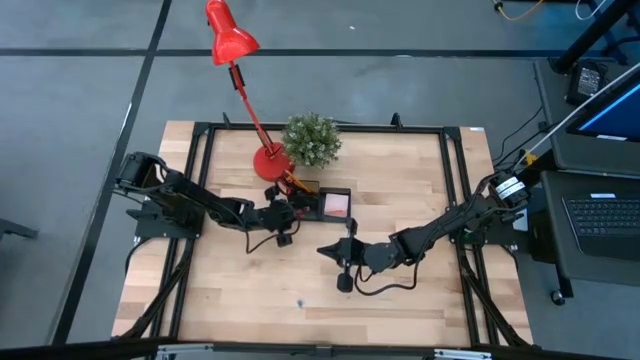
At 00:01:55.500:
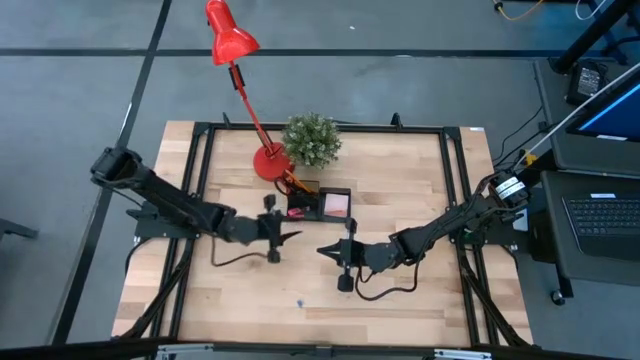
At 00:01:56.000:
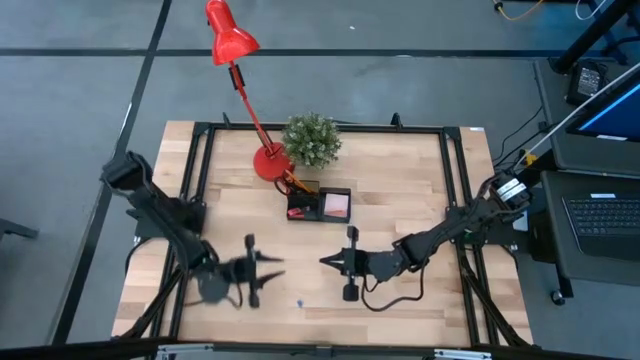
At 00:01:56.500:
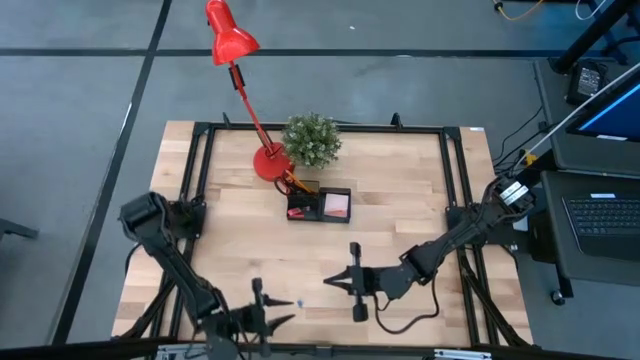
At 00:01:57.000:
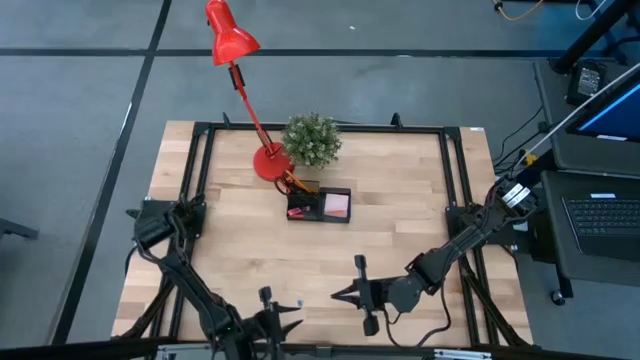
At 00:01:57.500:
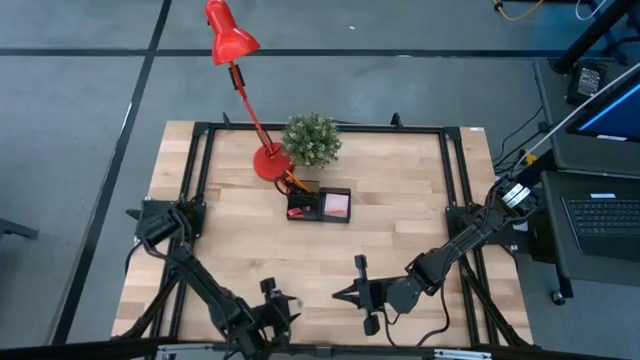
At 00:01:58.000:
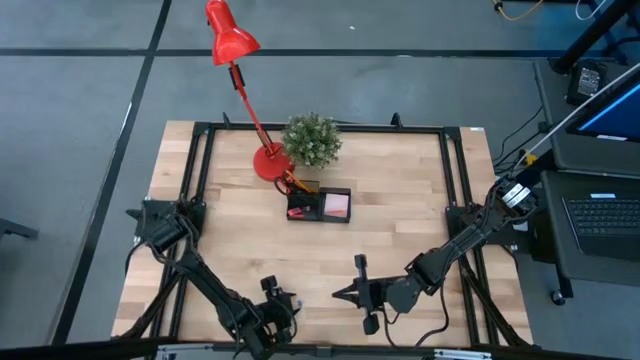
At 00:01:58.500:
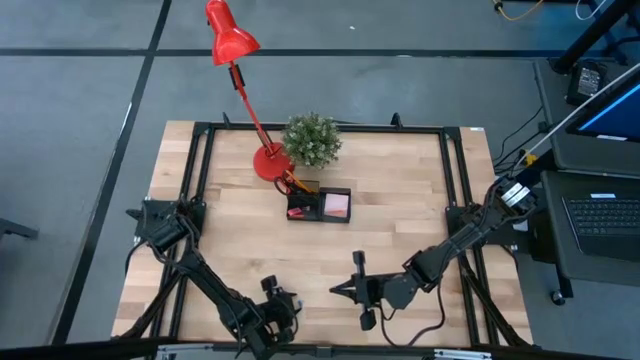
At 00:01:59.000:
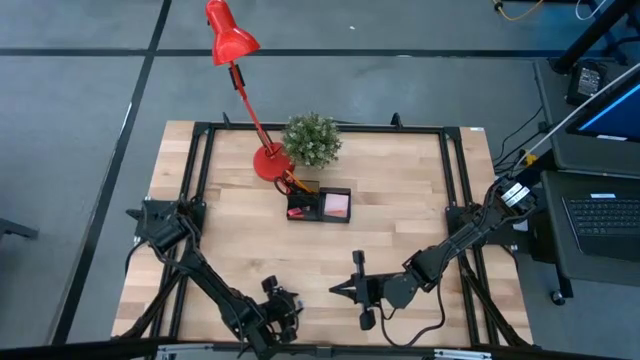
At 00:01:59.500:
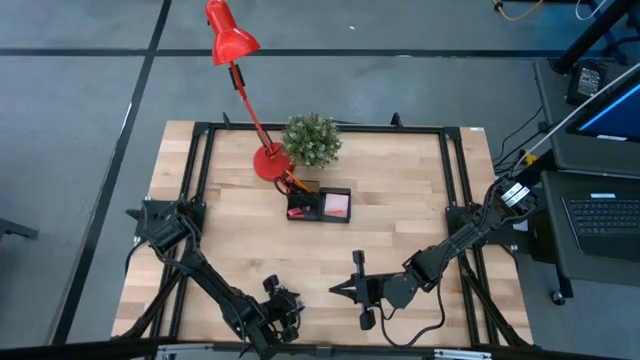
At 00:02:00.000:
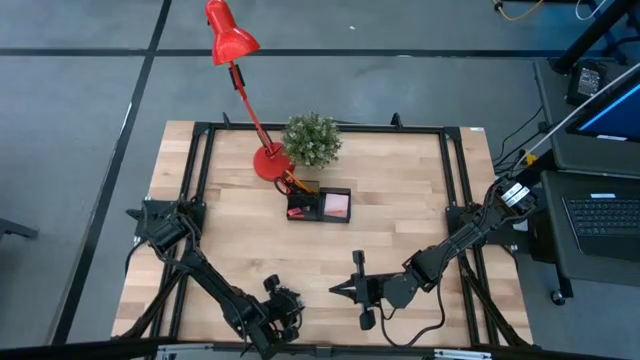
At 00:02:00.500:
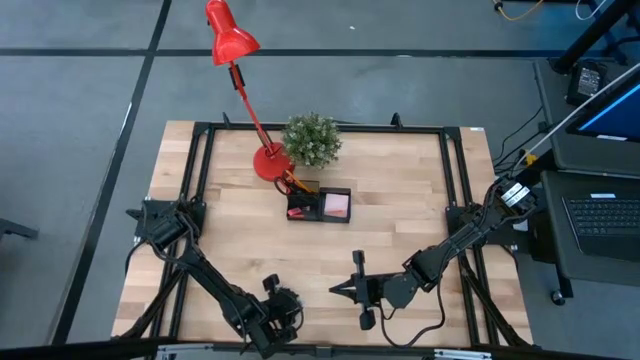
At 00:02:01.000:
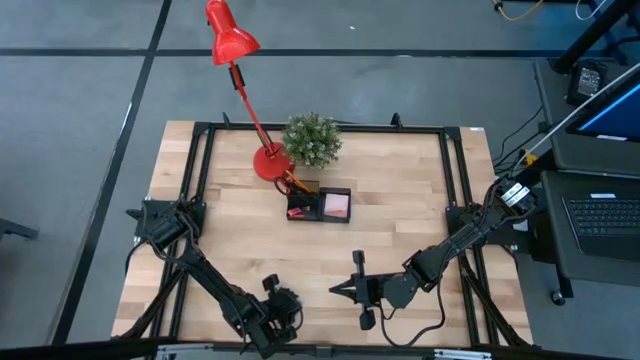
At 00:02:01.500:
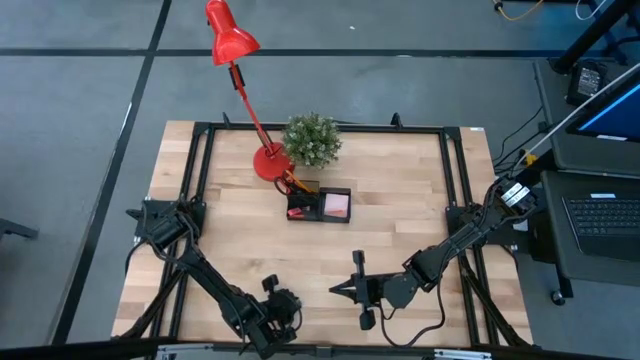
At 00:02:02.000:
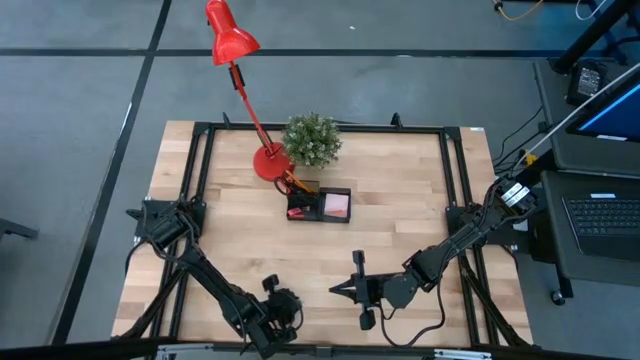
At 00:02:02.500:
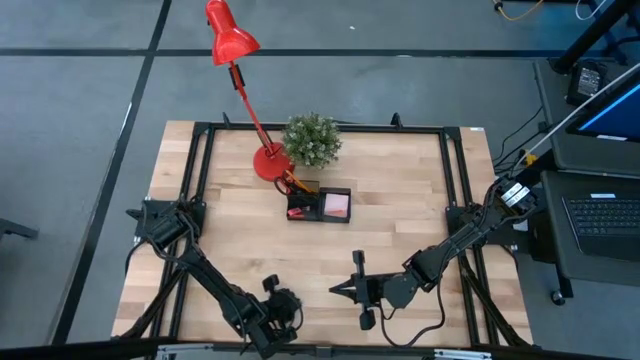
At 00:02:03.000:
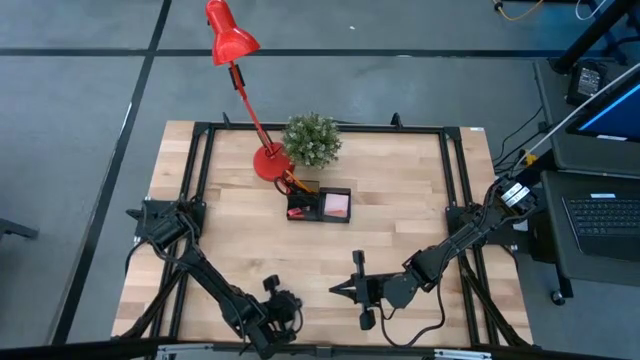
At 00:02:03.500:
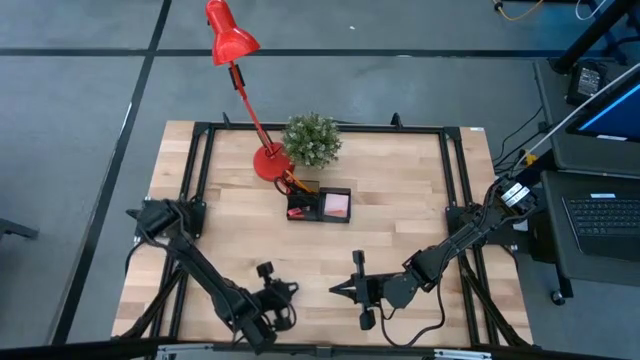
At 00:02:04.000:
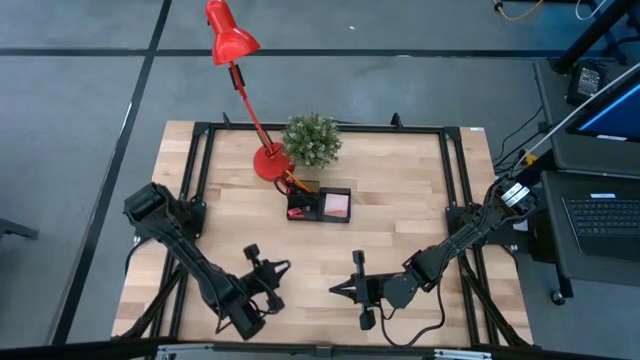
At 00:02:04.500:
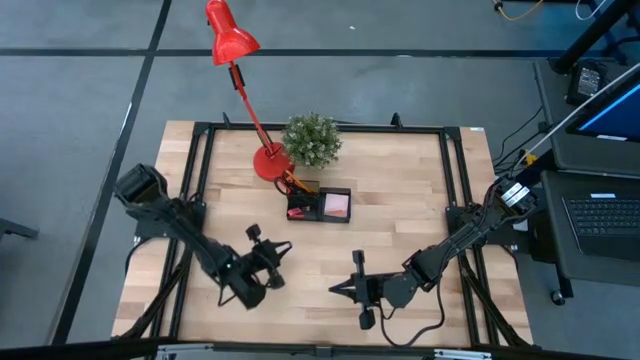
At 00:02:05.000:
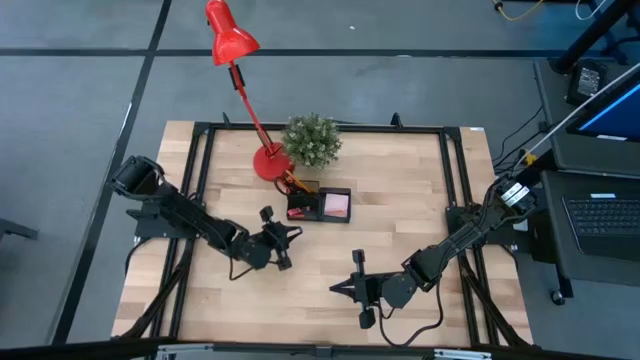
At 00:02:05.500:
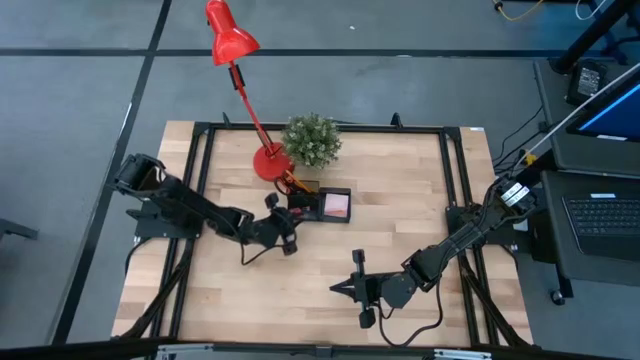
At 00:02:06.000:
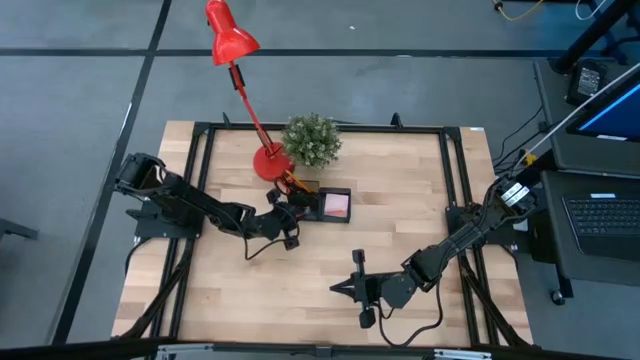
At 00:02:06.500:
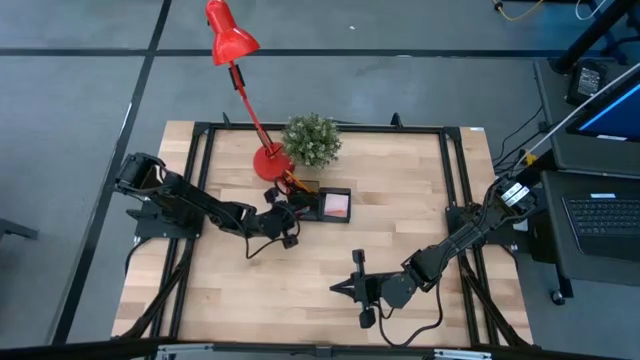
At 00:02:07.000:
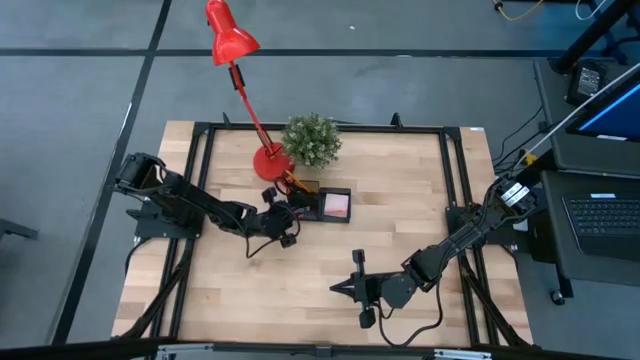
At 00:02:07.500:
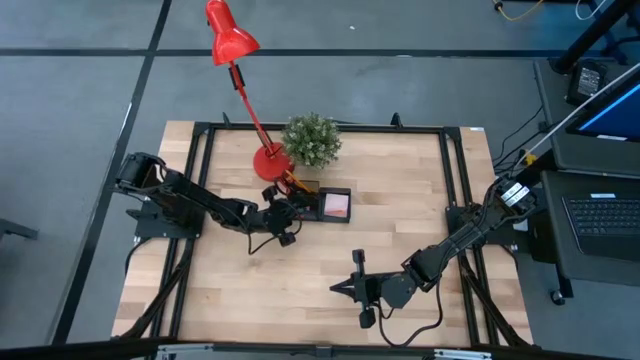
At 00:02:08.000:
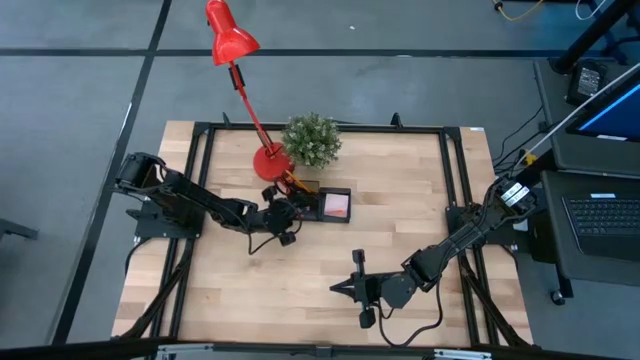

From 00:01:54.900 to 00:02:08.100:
Task: Pick and place office supplies into organizer
Put the blue binder clip into the black desk organizer

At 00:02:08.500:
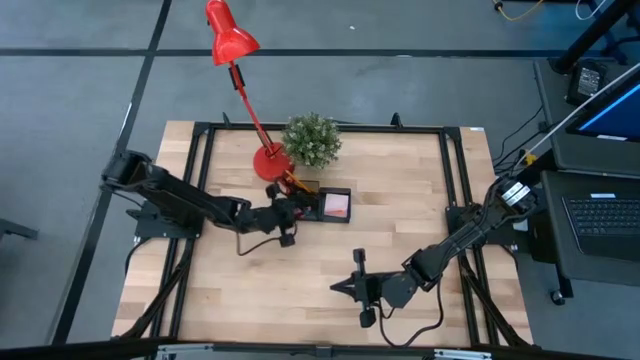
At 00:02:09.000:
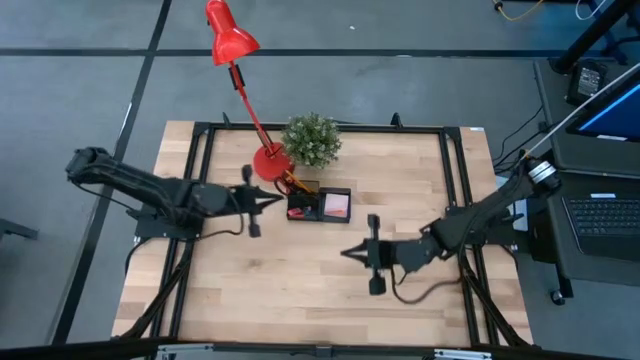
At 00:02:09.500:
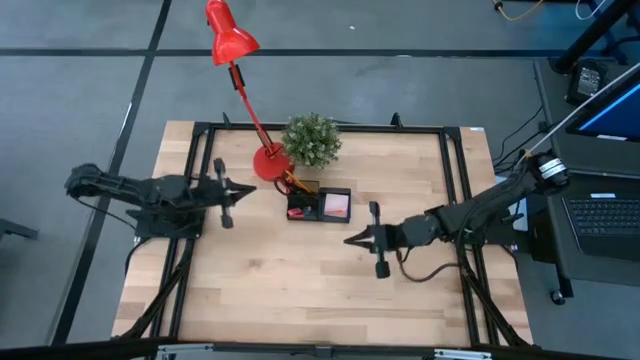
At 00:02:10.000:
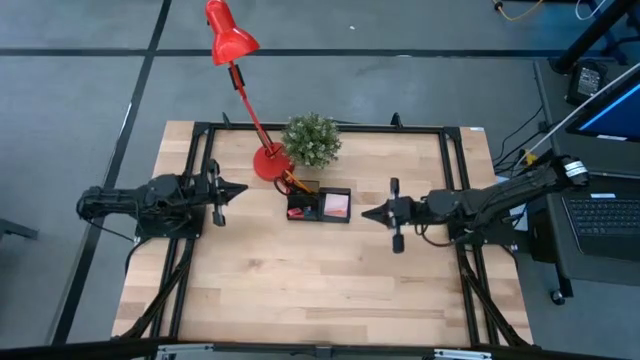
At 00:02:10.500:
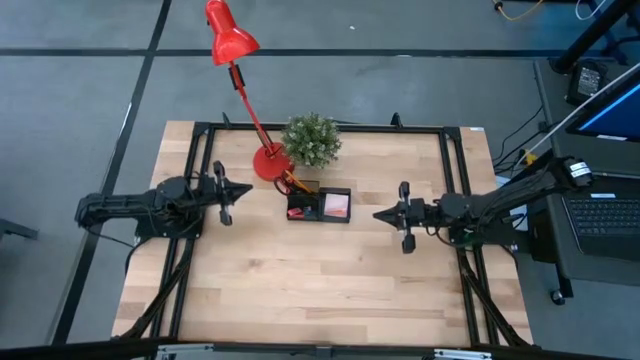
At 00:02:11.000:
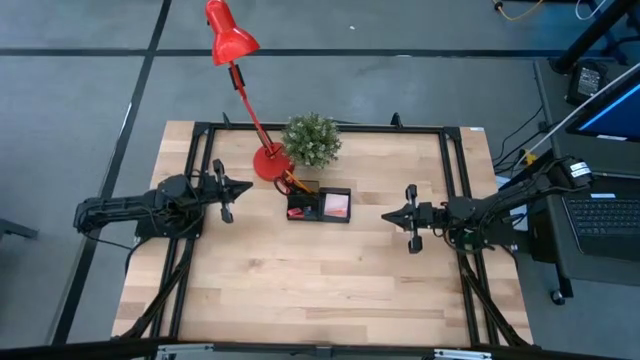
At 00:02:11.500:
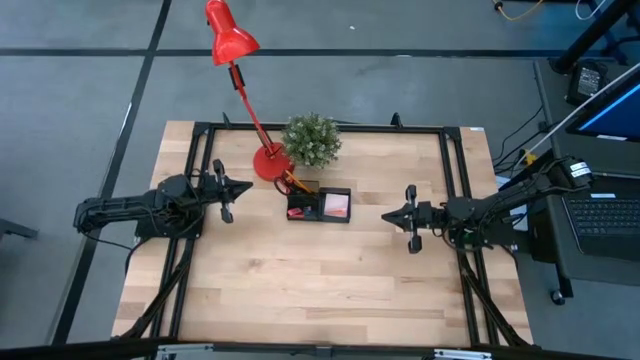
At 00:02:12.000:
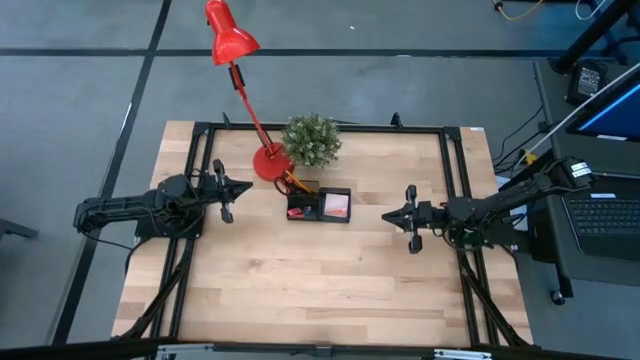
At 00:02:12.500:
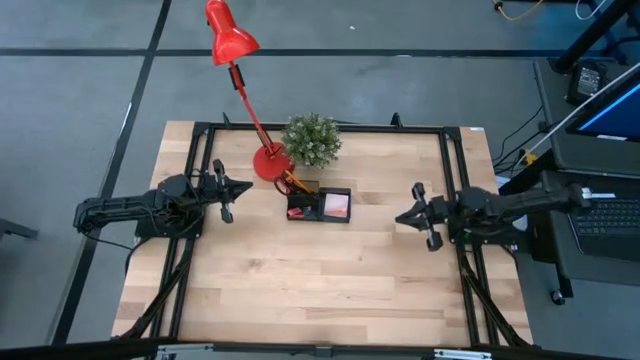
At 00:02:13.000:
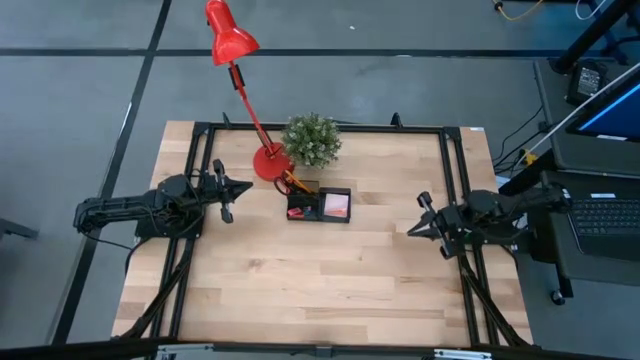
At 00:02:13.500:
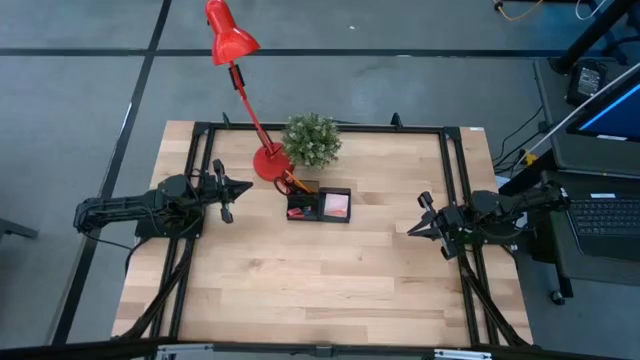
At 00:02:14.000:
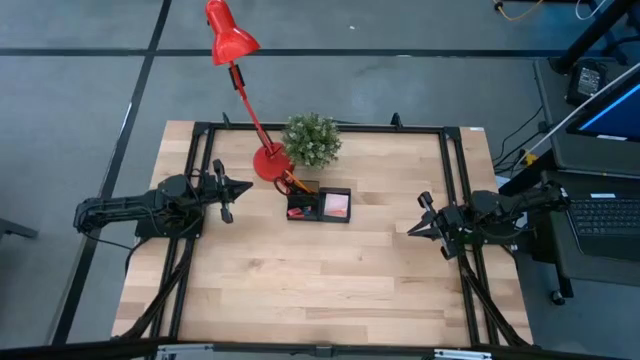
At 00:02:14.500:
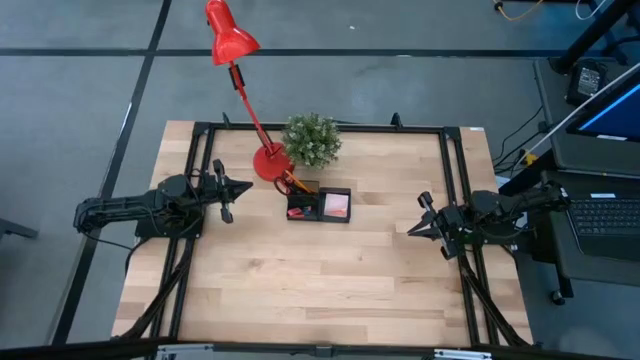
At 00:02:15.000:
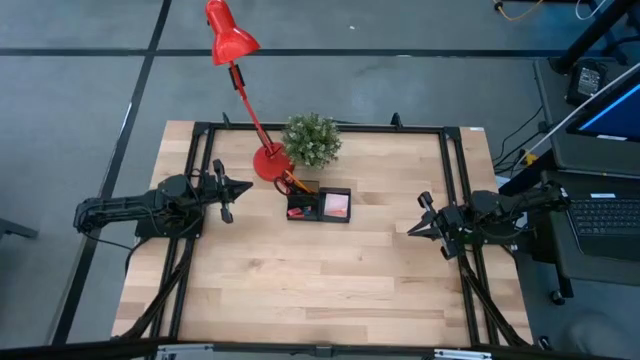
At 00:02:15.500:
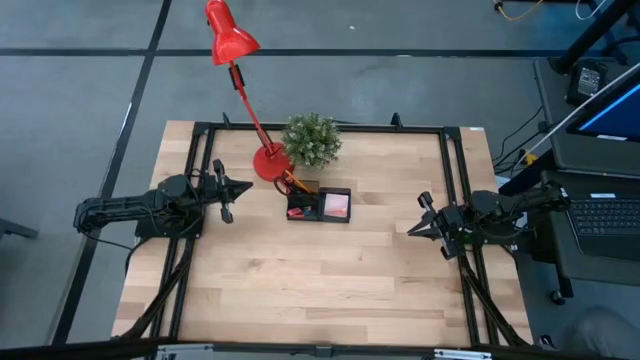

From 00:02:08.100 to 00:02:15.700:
Return to Home Position
